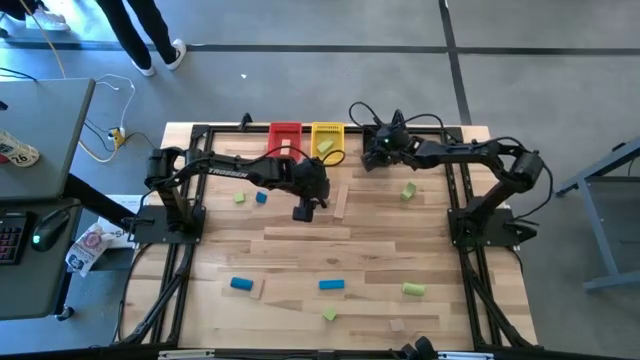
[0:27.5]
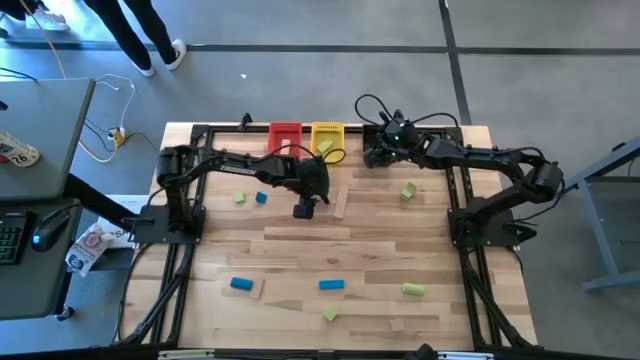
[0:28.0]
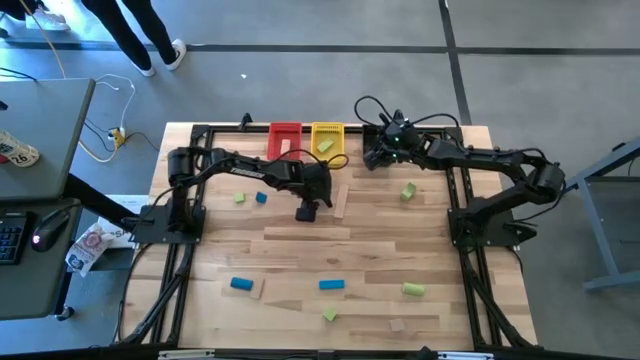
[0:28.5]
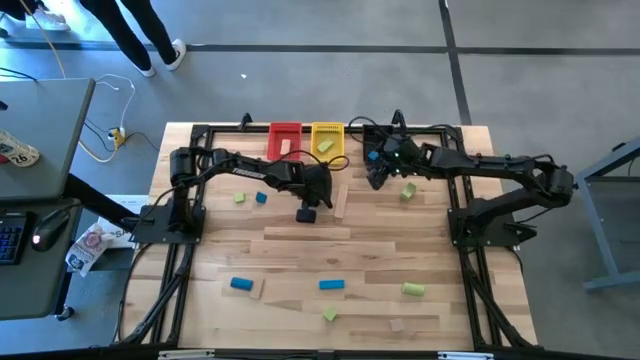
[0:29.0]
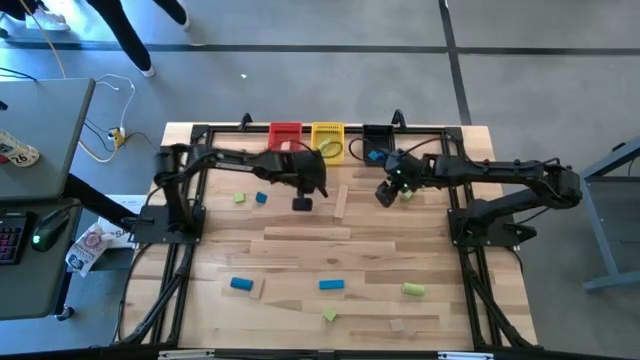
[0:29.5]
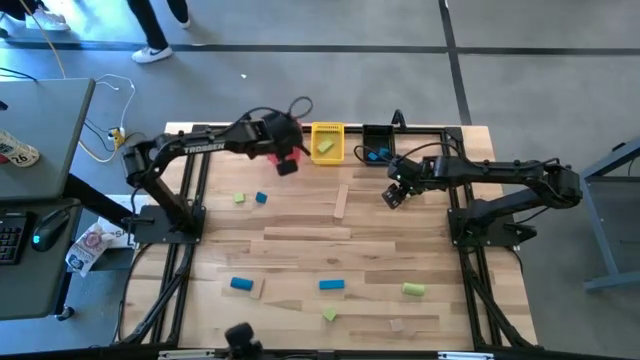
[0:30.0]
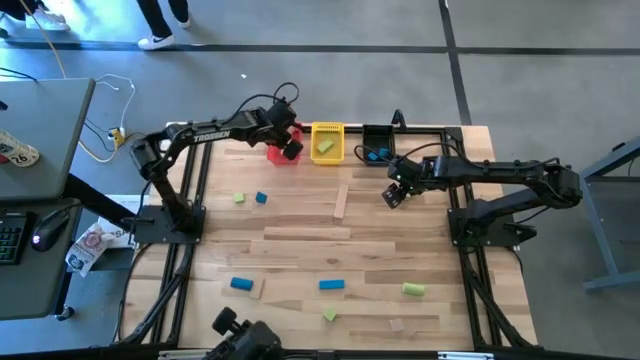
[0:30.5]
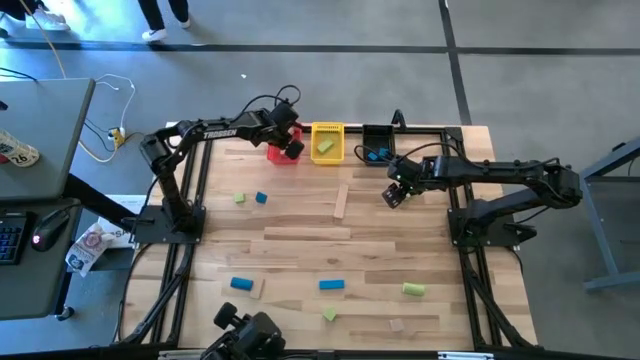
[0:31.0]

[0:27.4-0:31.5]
Task: Sort & place blocks by color
Put the brown block into the red basket

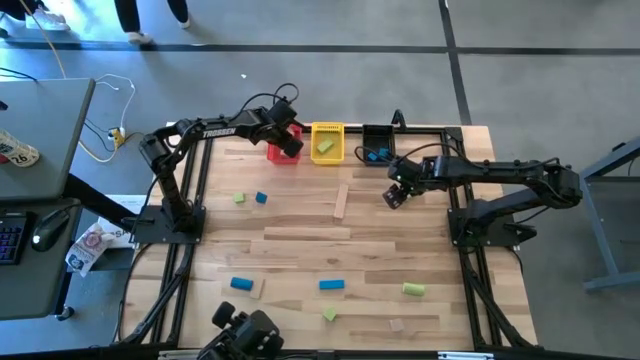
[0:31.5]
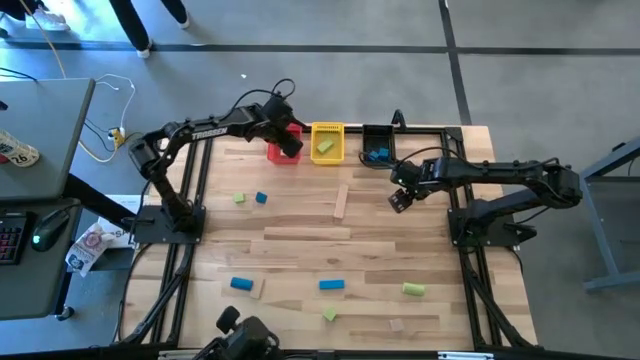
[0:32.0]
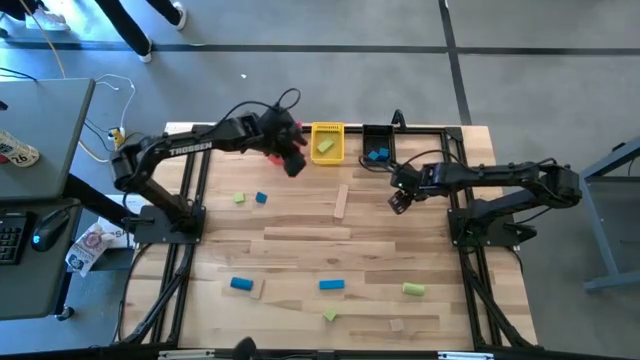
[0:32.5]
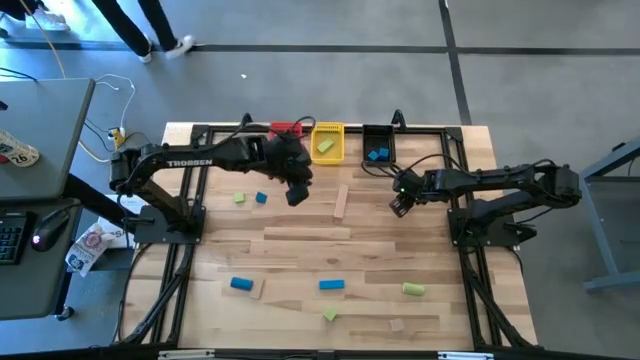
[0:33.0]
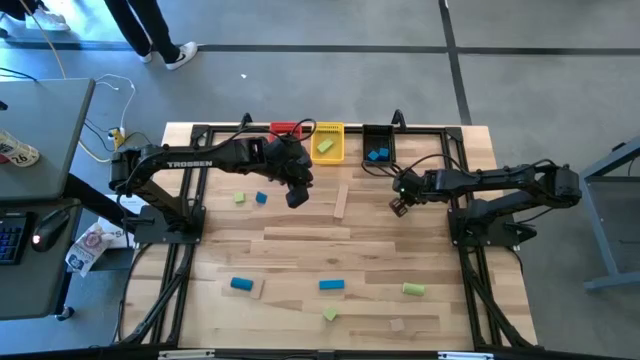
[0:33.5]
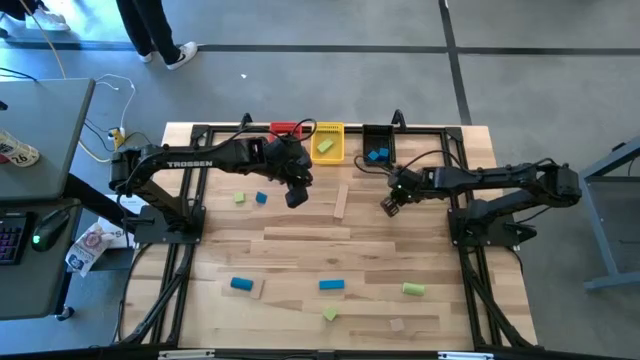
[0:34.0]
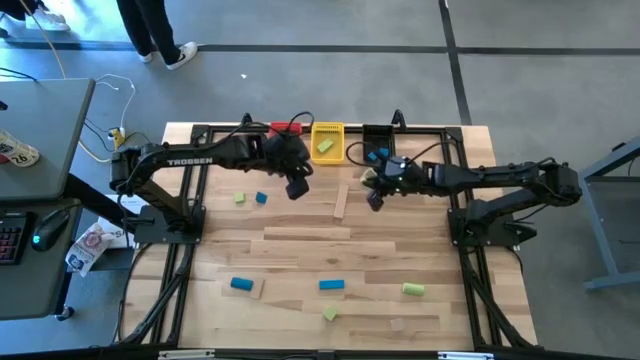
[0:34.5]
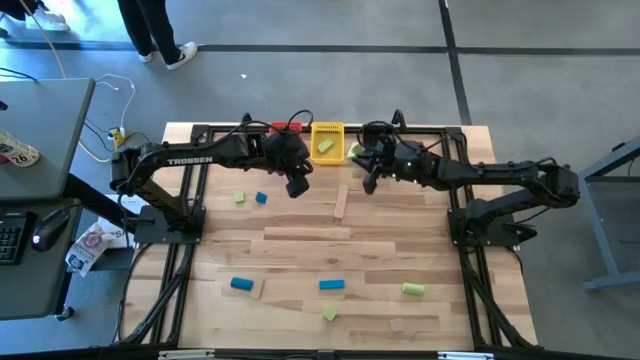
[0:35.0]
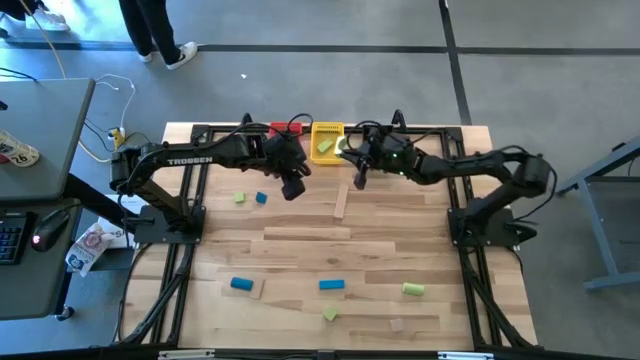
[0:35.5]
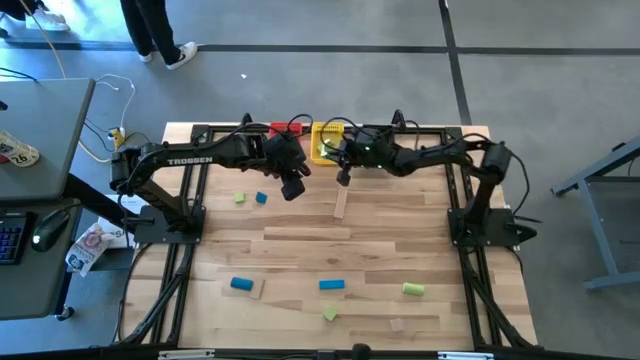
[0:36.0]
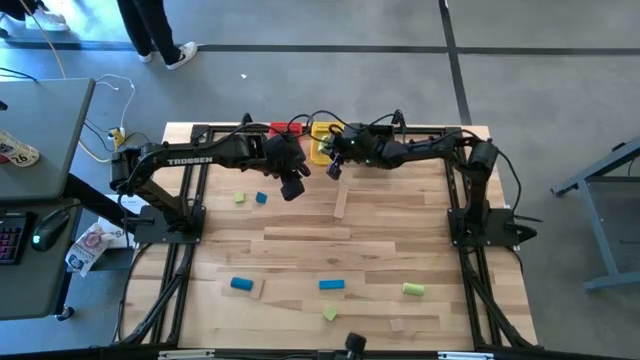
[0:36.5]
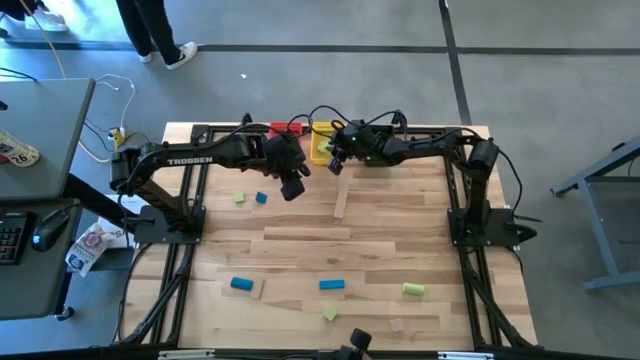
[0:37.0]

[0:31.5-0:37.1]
Put the green block into the yellow basket

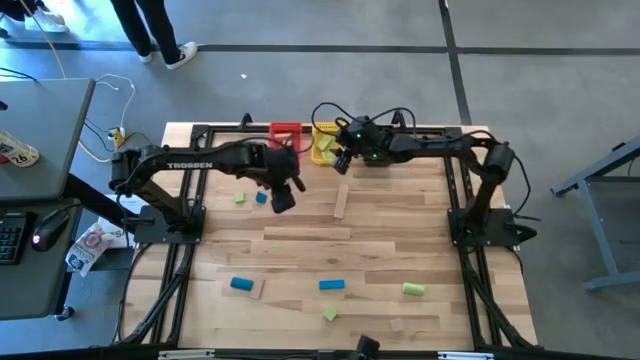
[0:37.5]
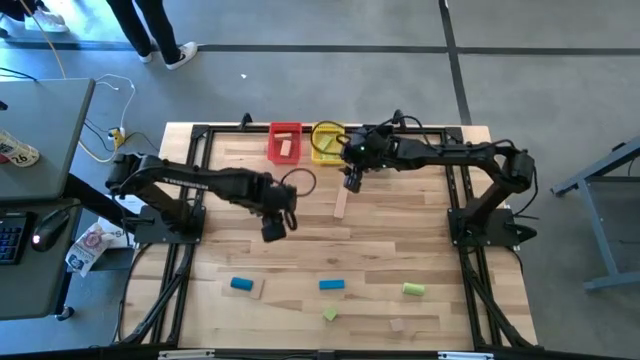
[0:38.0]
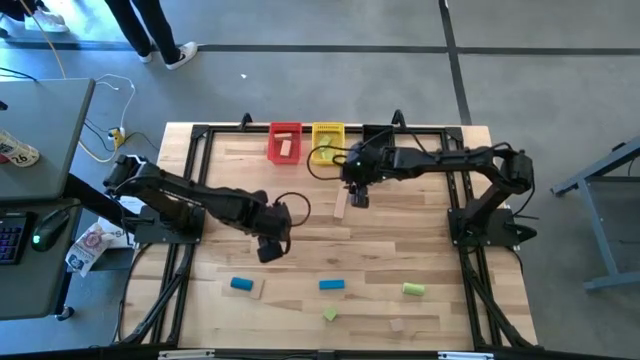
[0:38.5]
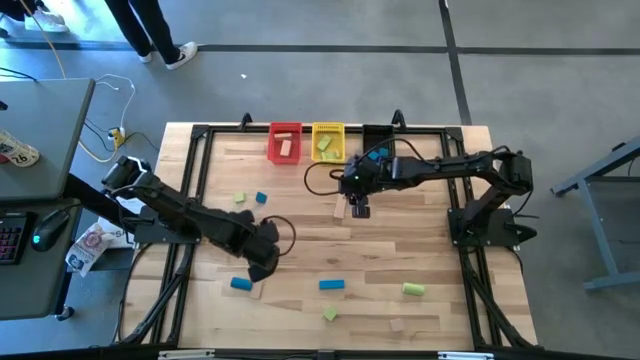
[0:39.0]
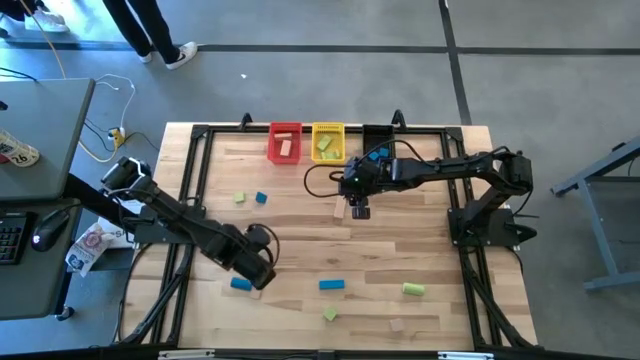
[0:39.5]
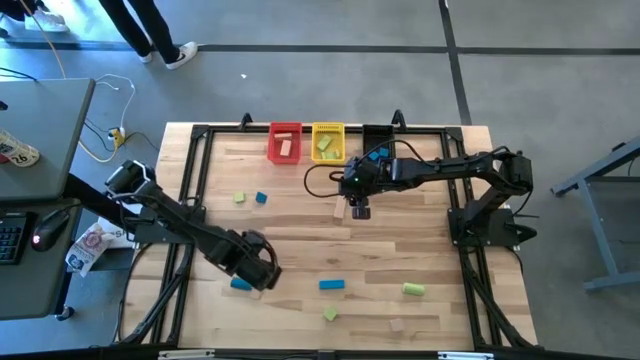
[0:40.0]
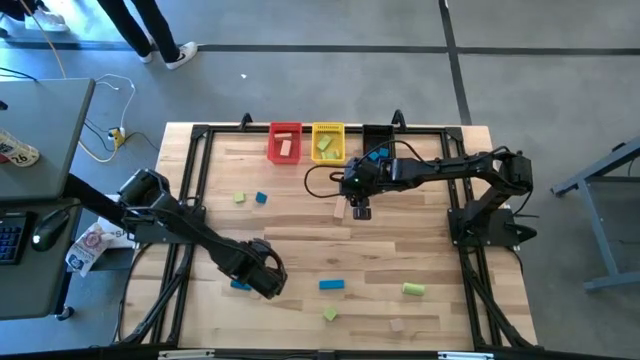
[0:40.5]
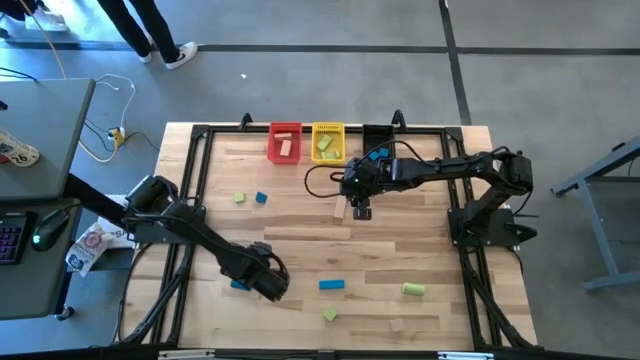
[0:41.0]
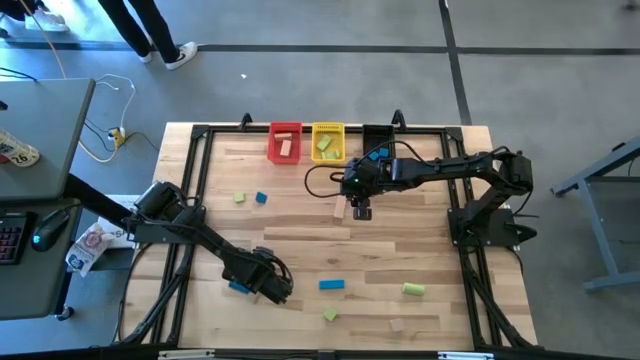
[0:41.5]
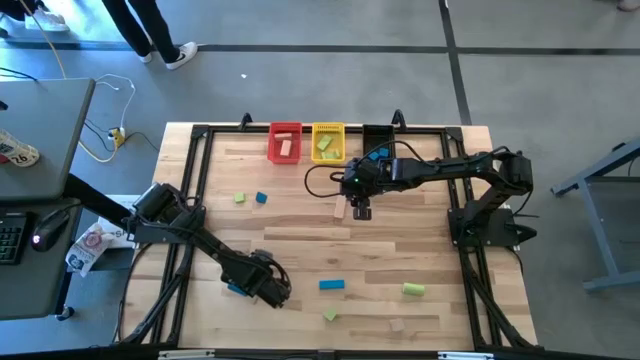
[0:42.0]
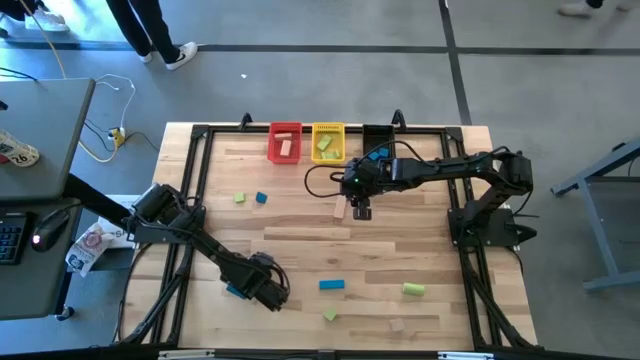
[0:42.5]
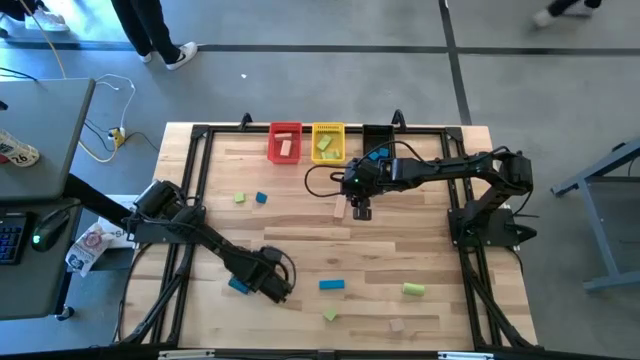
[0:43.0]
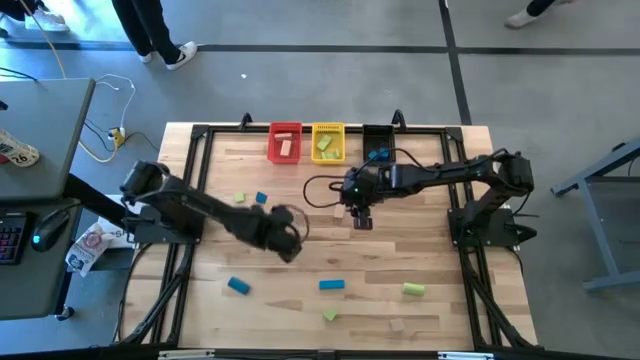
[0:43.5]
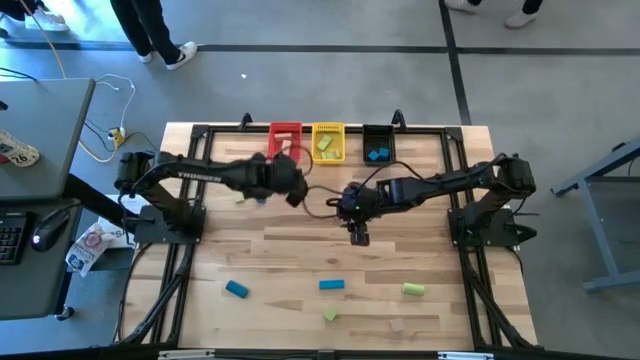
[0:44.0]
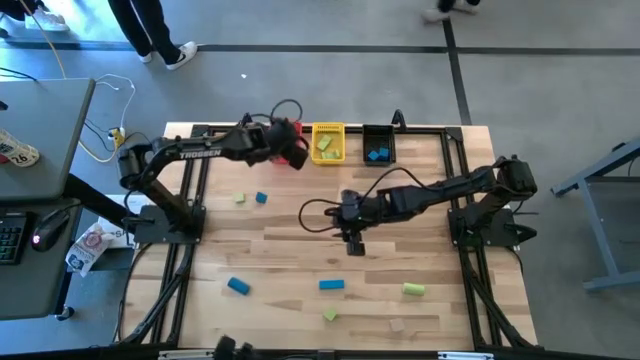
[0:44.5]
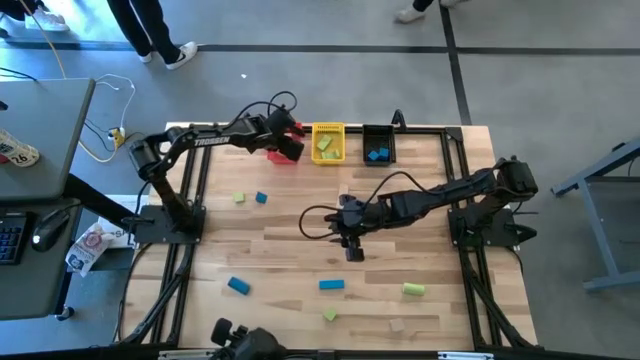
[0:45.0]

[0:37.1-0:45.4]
Put the brown block into the red basket

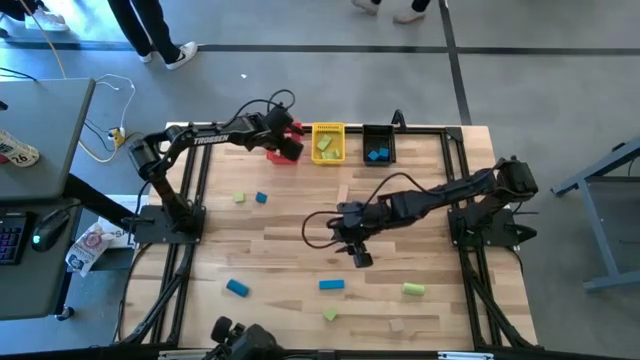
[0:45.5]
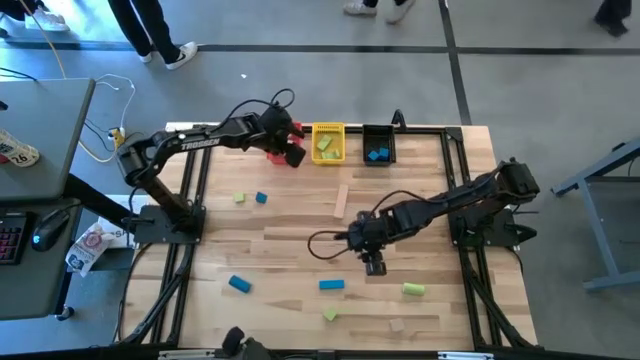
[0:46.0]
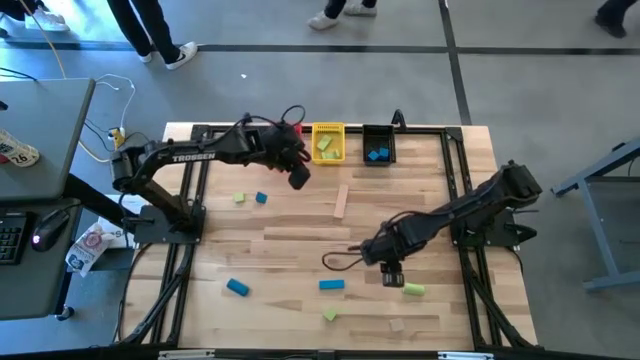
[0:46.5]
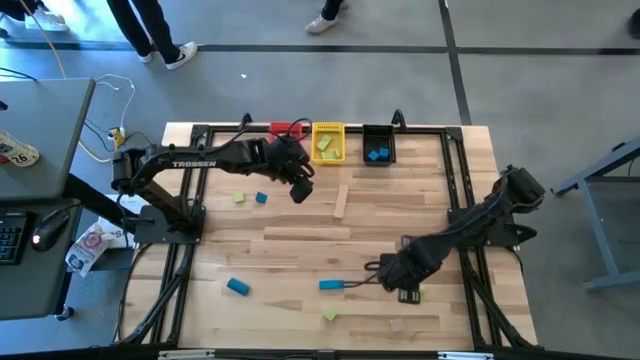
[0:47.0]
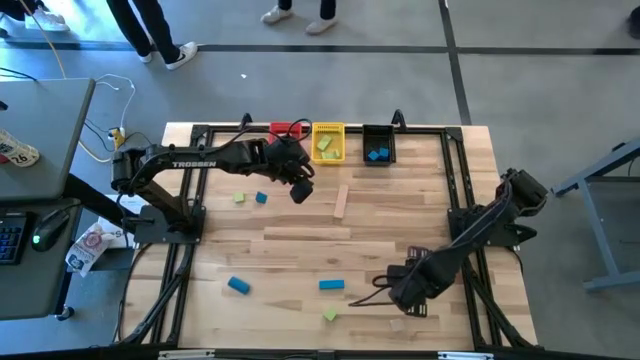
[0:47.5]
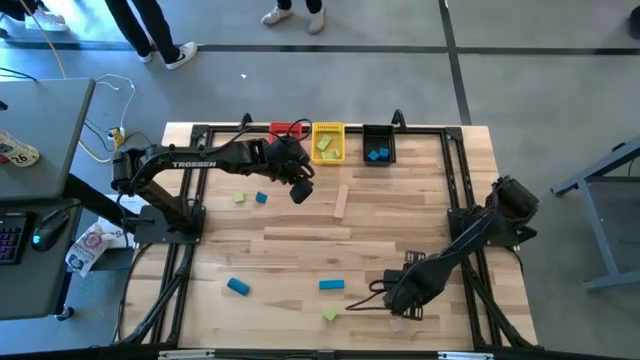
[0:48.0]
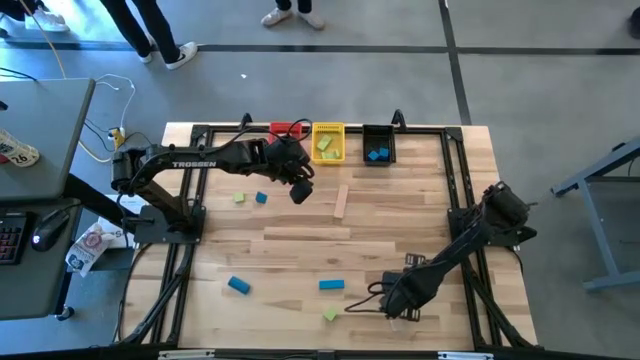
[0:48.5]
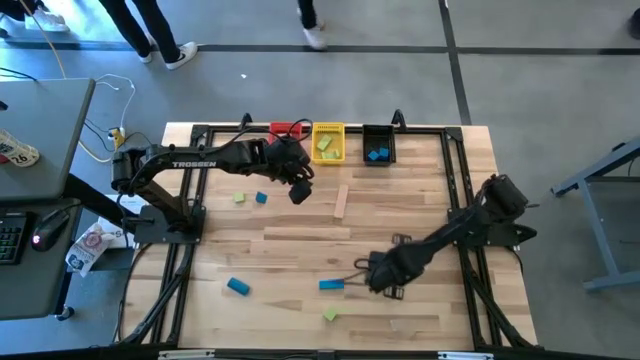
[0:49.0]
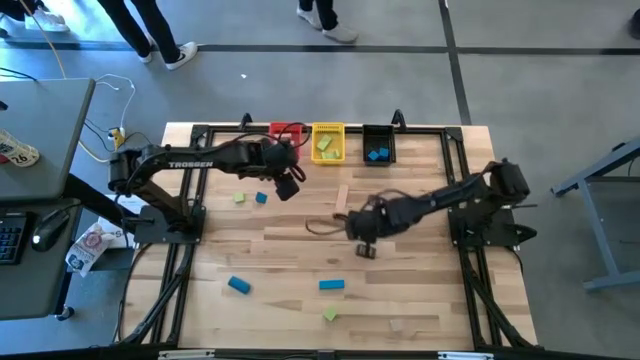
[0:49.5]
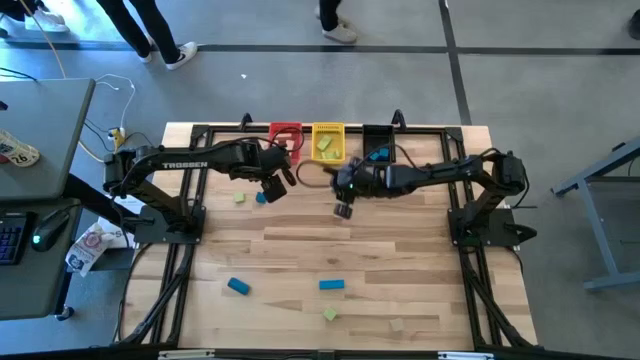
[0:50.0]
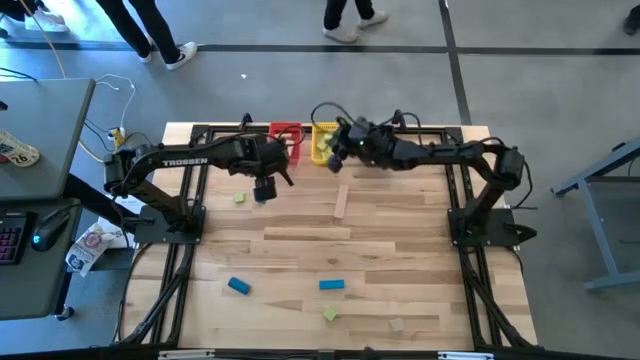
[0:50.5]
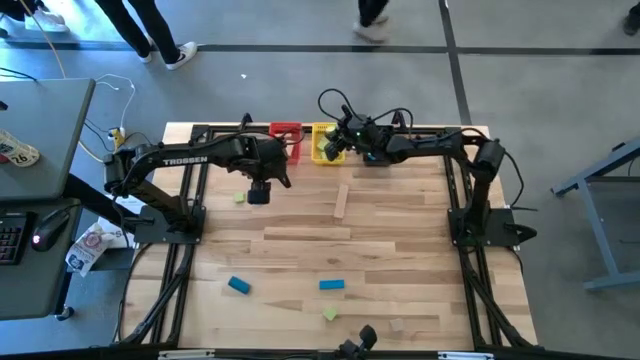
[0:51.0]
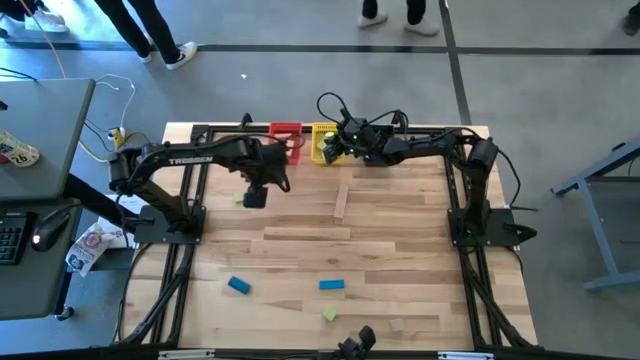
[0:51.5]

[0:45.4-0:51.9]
Put the green block into the yellow basket
